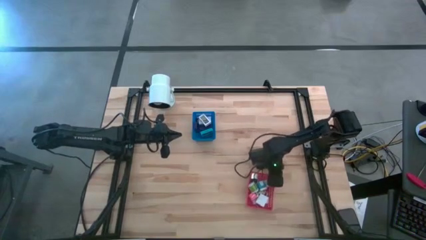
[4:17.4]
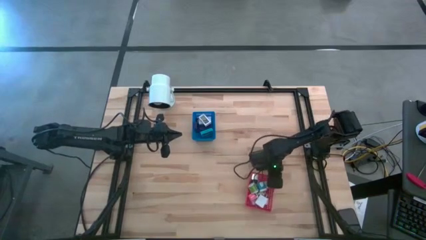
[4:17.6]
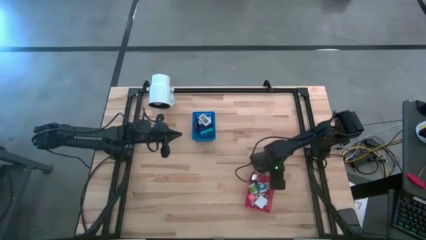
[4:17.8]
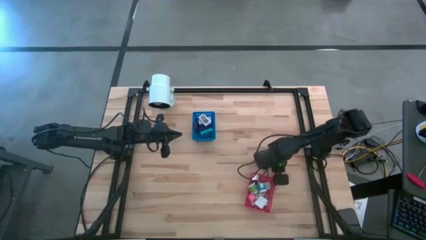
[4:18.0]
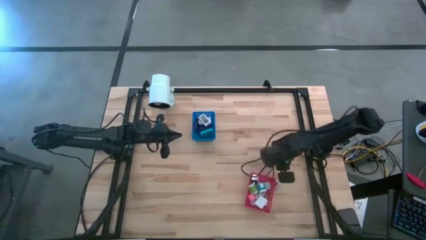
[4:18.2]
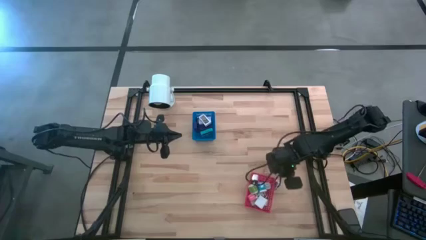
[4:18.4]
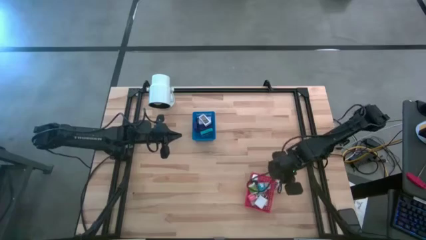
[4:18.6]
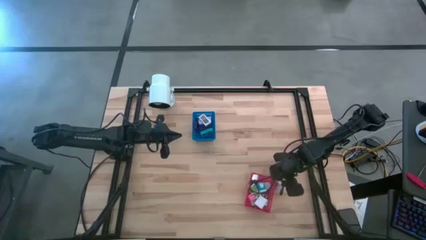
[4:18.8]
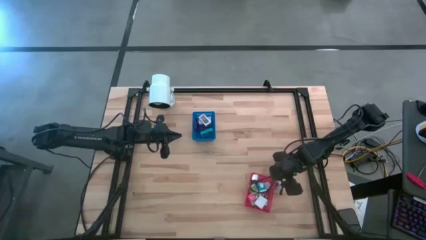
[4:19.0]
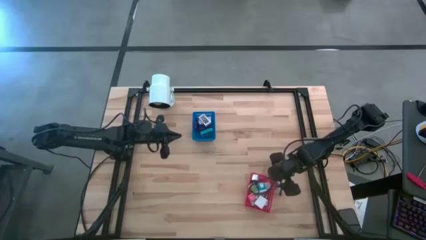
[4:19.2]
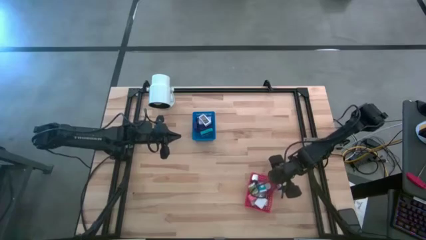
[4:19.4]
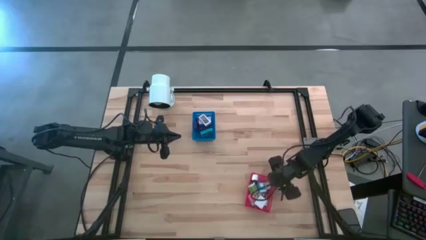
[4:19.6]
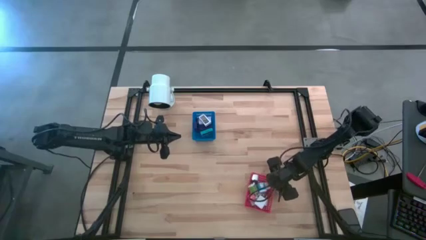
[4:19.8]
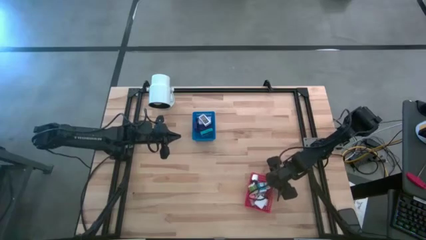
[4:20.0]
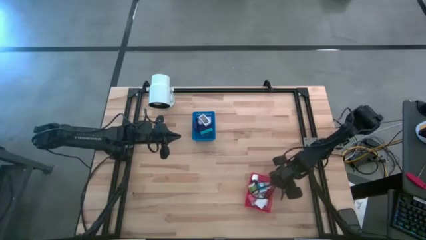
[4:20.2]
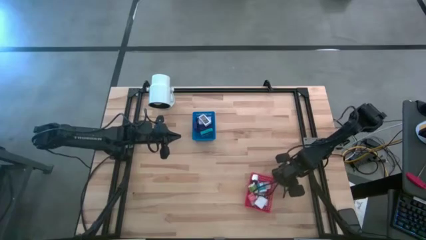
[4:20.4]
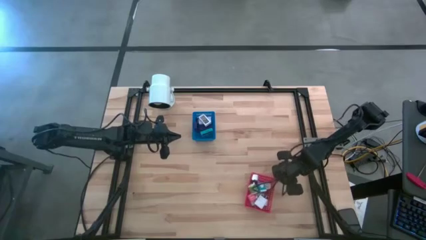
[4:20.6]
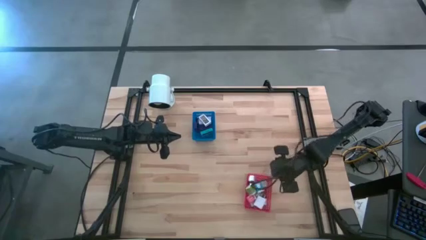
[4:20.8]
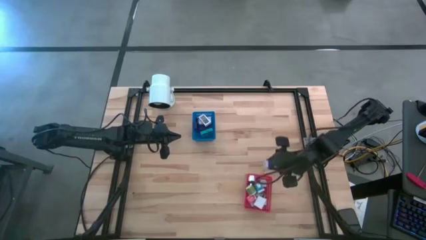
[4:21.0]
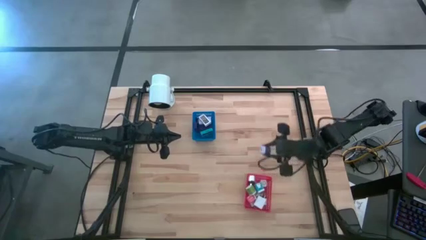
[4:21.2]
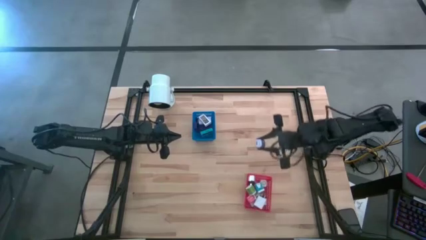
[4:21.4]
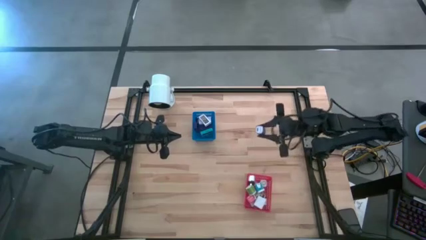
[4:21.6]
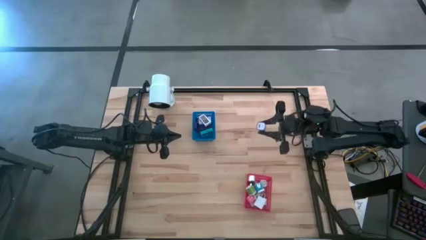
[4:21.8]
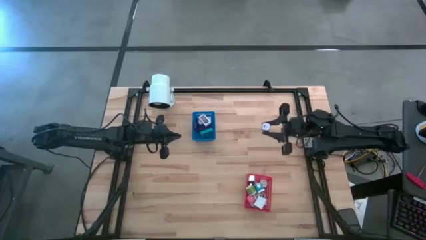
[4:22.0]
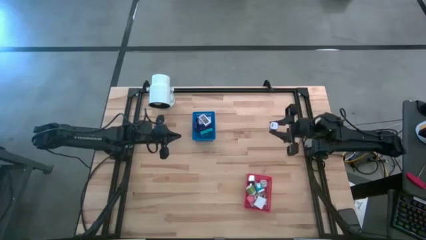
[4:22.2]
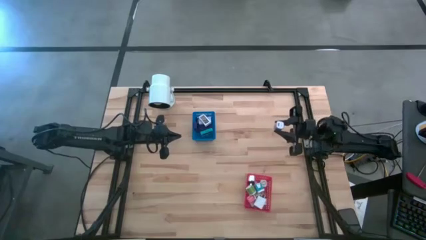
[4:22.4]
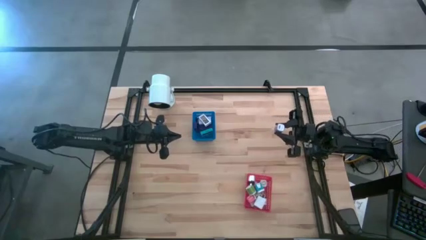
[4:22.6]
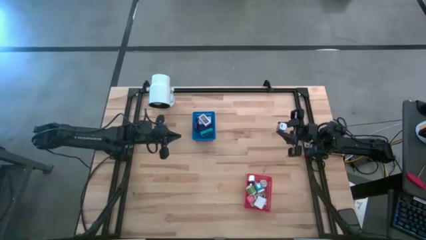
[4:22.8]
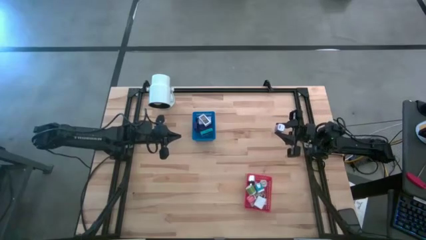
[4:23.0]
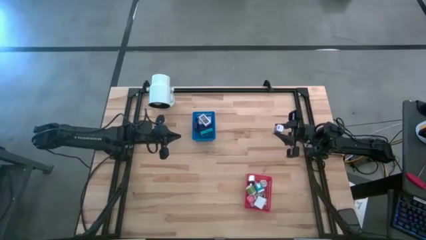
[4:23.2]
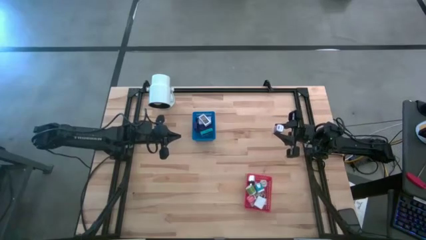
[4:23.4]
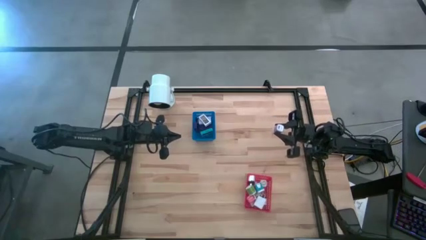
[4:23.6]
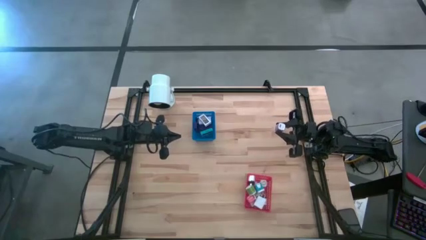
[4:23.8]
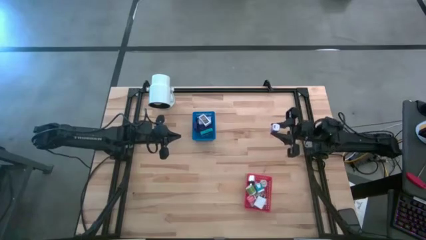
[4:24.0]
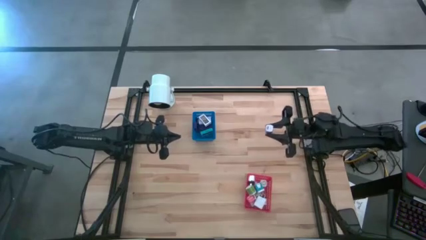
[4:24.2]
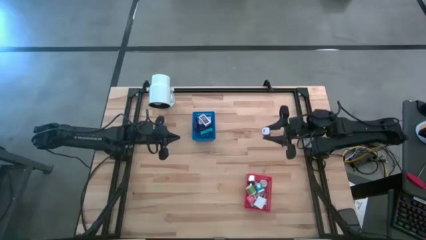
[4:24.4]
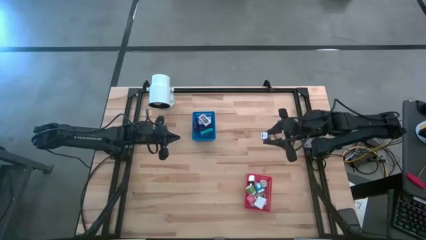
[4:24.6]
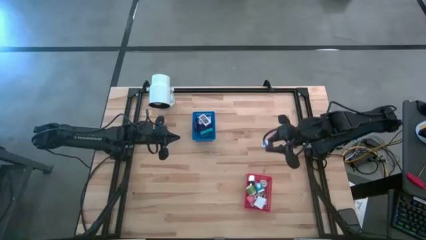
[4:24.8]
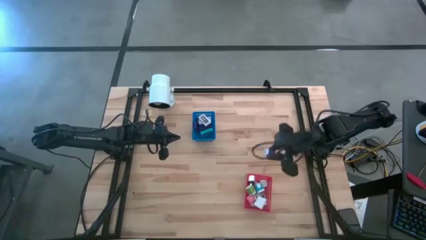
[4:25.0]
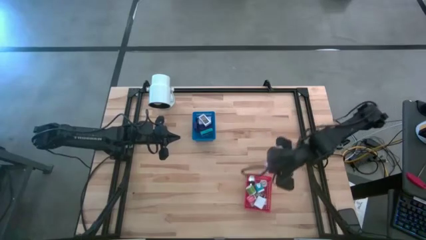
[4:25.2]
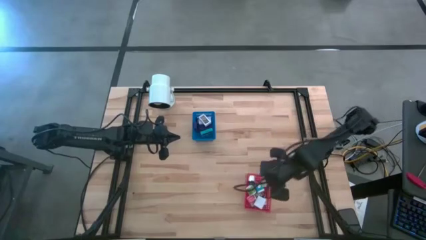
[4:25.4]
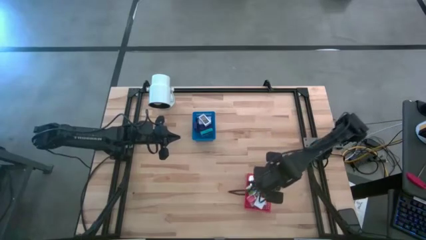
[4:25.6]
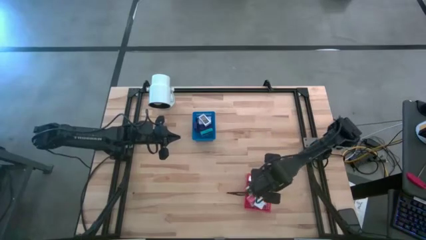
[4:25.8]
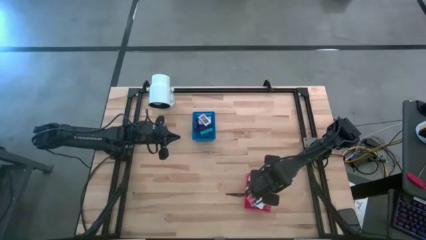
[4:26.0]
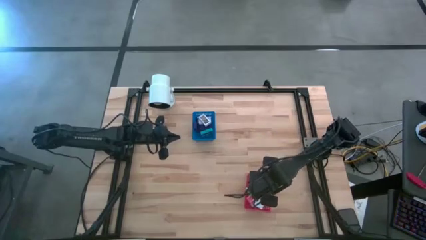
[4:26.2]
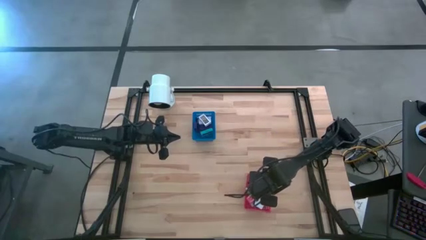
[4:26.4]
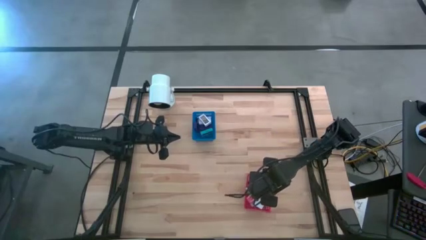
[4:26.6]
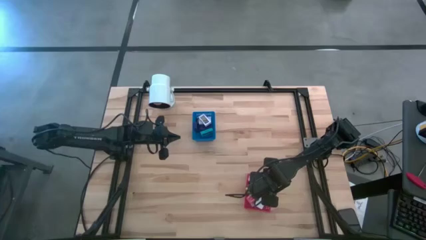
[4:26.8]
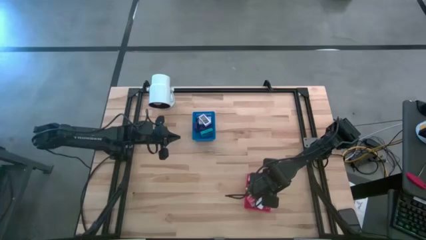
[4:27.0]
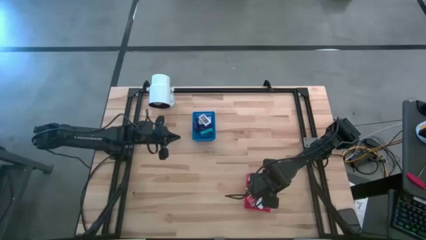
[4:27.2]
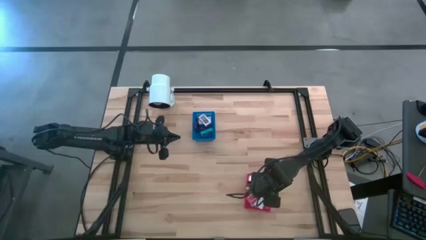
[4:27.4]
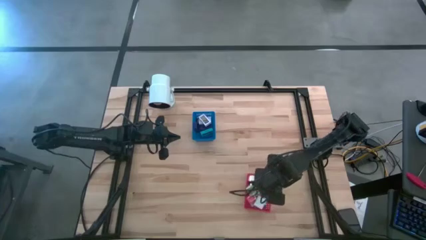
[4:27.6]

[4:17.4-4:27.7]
Task: Pick & Place Office items
Put the purple charger adapter into the red bin

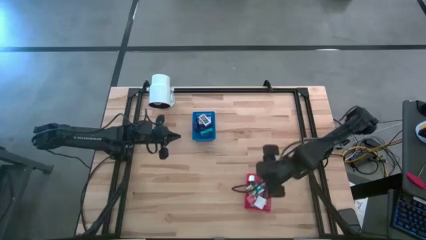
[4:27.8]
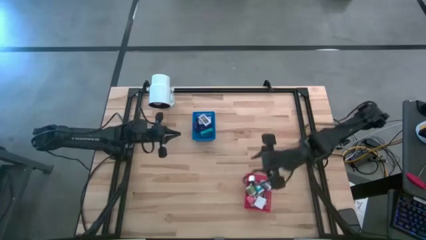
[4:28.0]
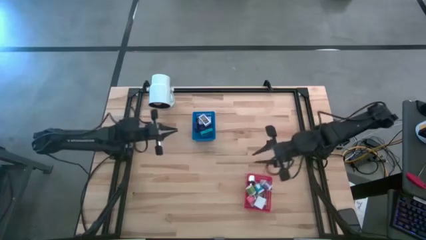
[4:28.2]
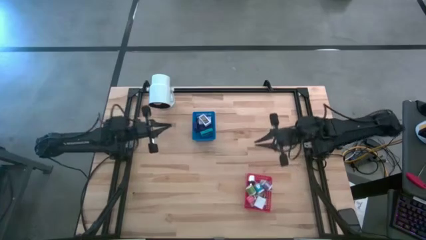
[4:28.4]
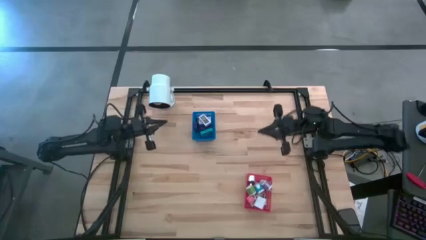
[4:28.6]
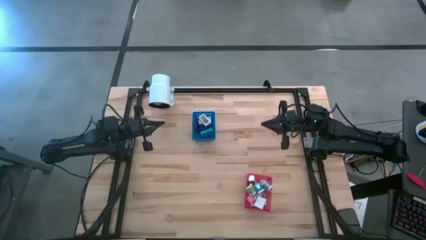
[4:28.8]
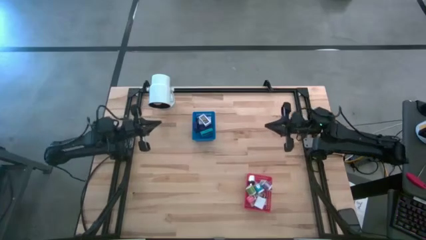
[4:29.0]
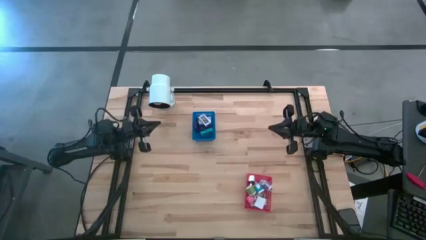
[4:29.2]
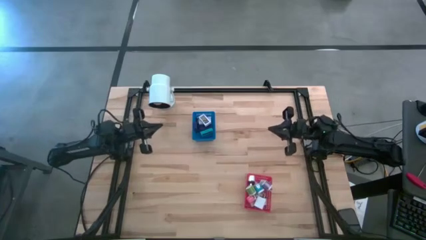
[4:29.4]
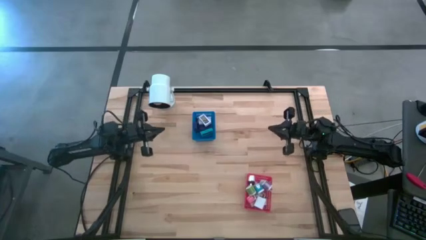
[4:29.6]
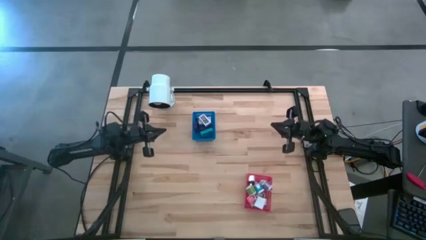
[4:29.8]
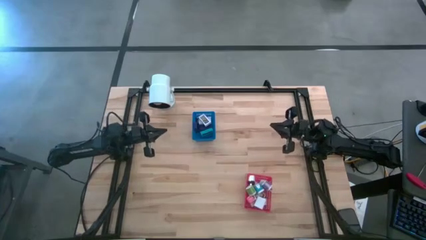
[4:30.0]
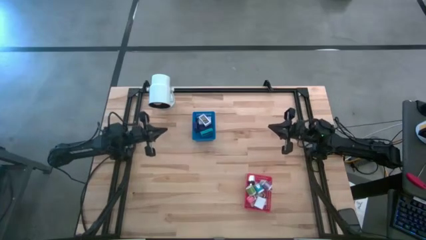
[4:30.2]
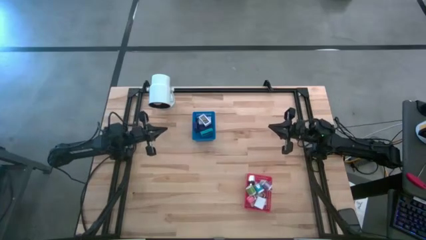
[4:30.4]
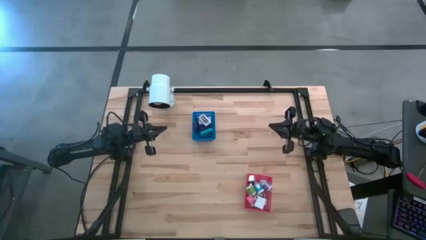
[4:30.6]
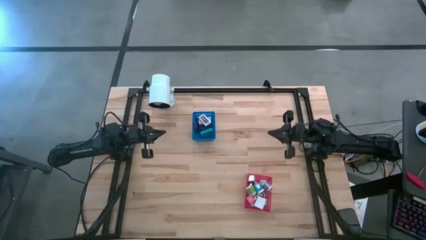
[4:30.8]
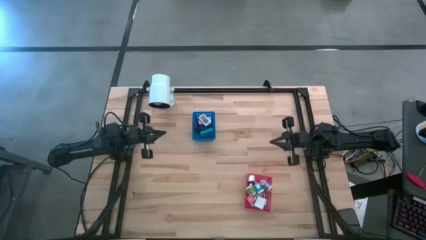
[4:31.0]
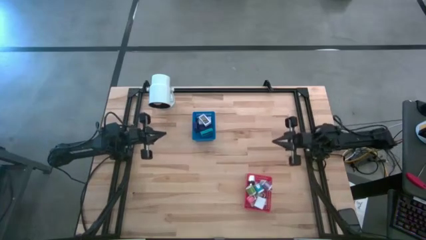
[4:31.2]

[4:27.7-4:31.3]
Return to Home Position

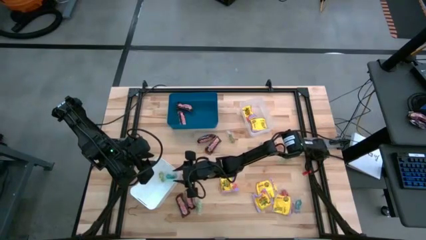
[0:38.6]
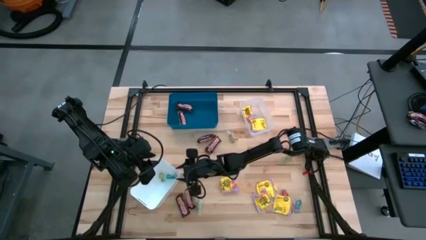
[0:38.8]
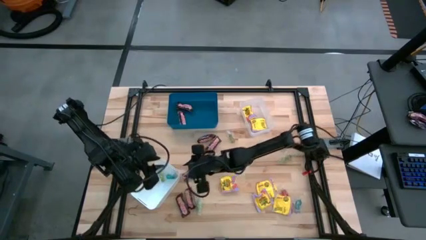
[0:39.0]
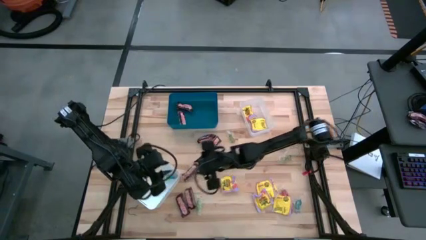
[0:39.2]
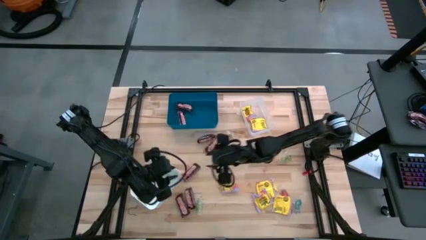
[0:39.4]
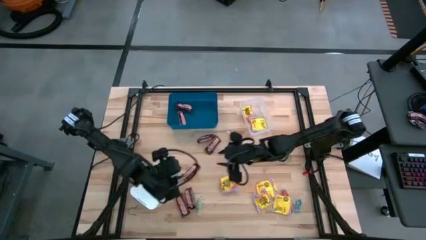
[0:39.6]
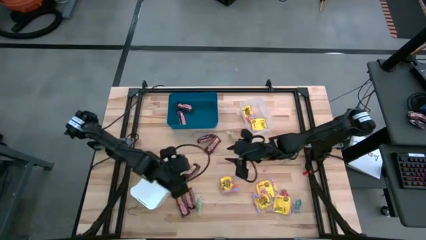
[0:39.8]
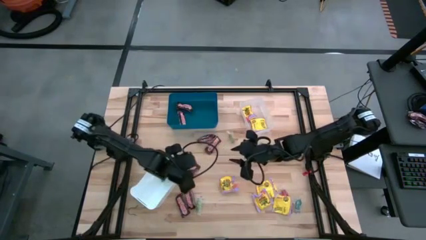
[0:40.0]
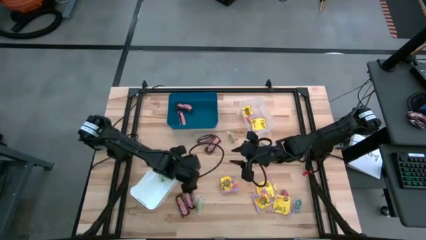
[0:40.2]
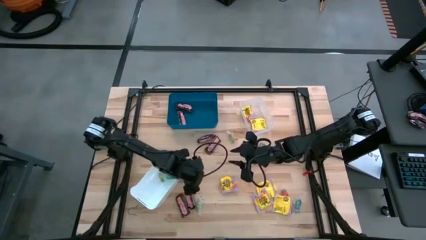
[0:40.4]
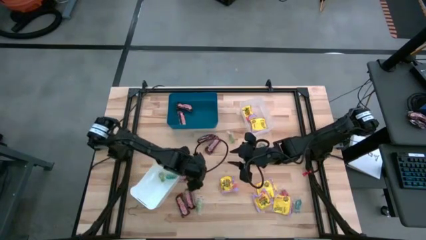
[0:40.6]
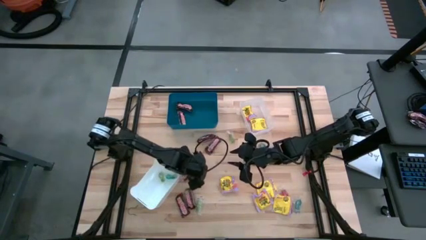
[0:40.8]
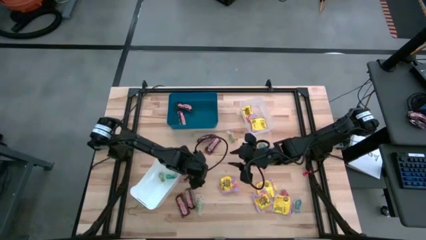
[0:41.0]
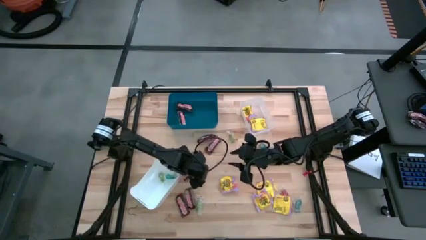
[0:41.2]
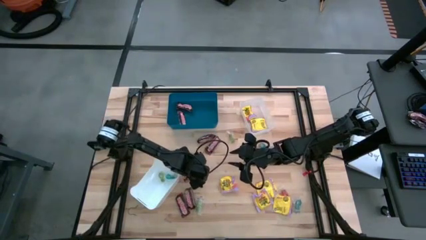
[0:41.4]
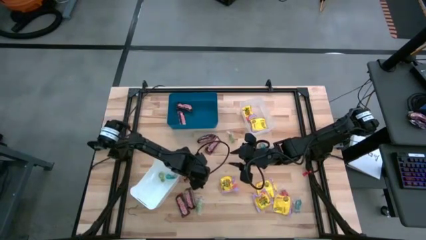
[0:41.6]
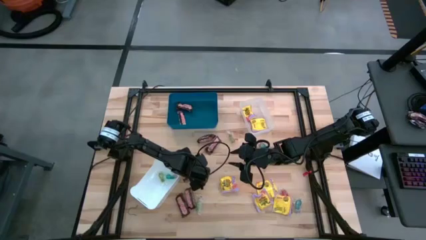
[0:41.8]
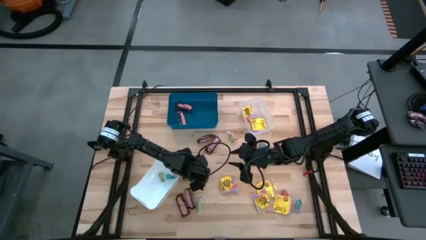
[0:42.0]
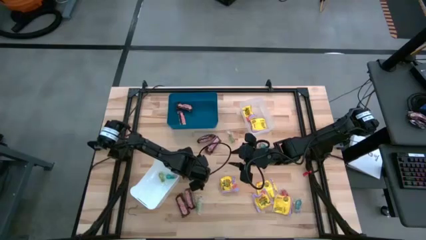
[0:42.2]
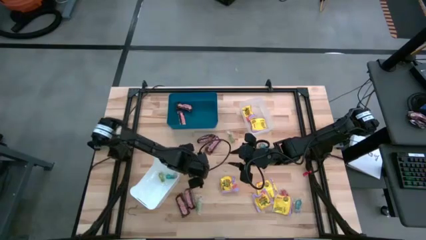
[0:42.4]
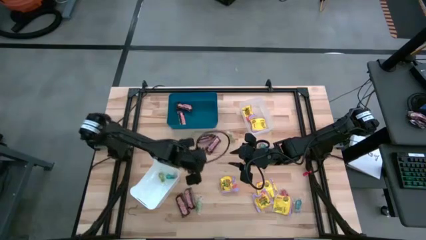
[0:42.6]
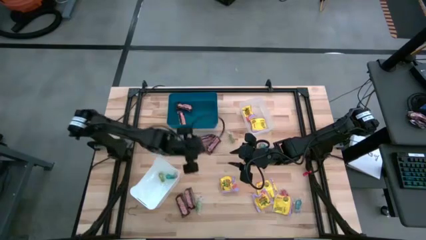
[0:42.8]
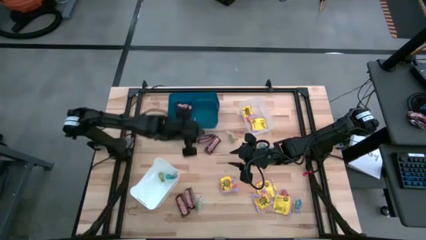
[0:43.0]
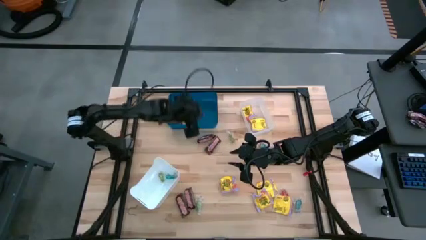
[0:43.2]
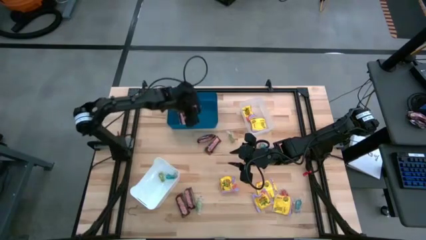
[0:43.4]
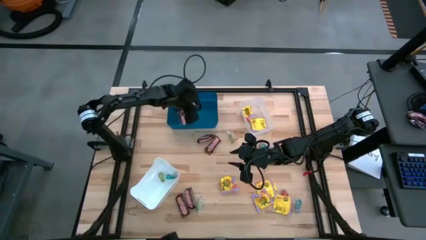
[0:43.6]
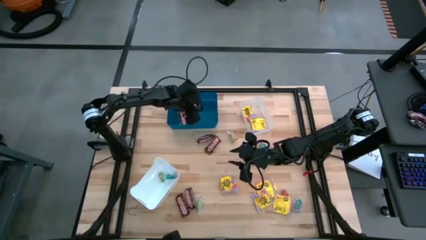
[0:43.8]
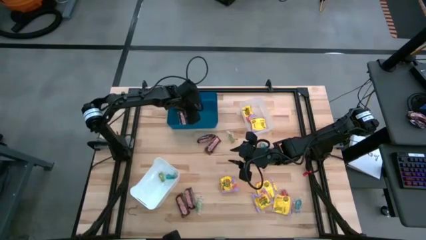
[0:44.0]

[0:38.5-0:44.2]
Task: Sort candy
Put the brown chocolate into the blue bin
